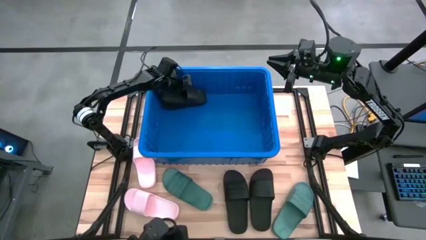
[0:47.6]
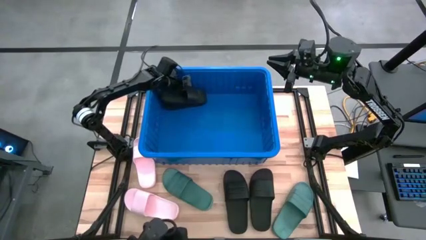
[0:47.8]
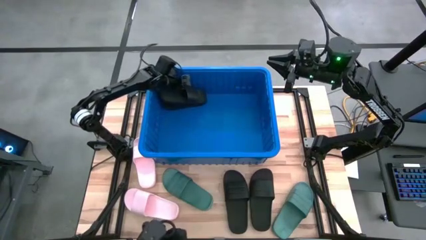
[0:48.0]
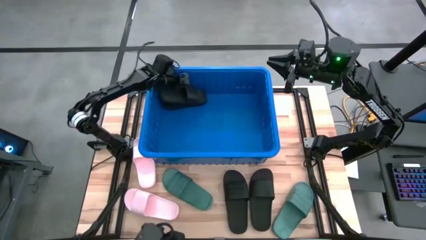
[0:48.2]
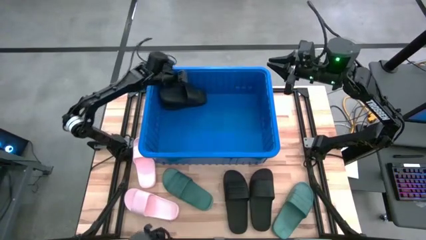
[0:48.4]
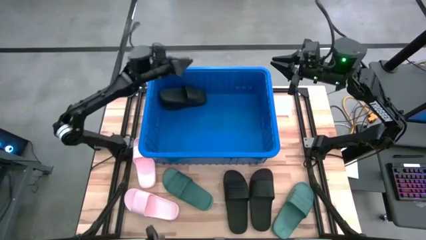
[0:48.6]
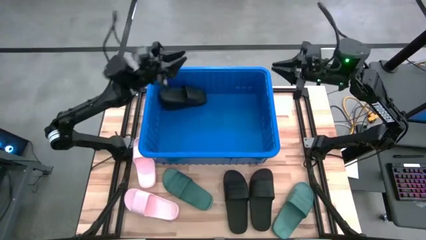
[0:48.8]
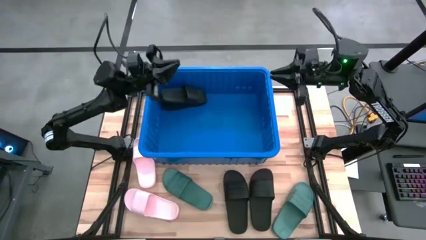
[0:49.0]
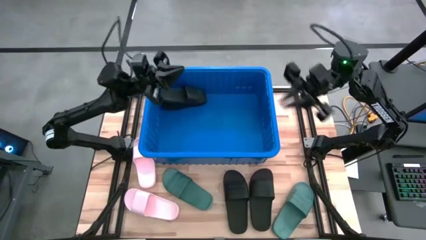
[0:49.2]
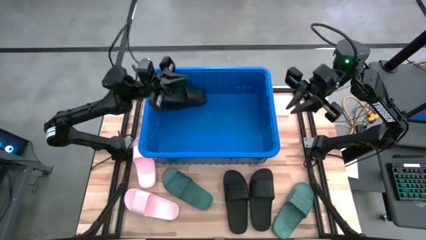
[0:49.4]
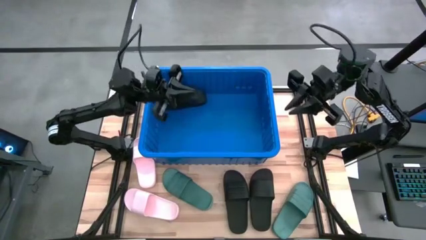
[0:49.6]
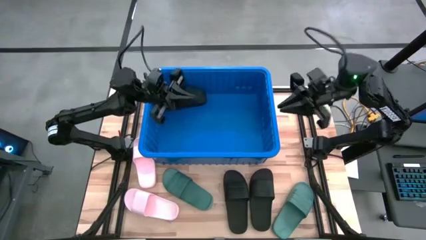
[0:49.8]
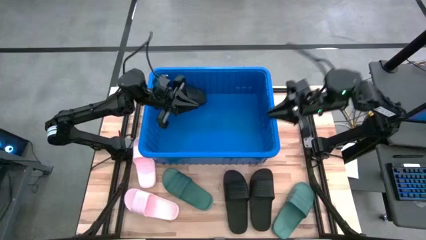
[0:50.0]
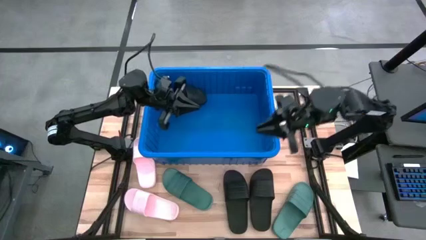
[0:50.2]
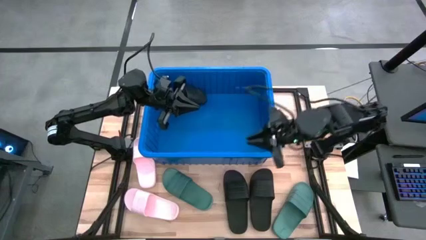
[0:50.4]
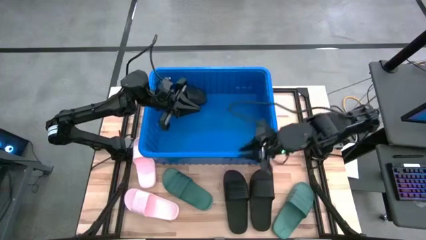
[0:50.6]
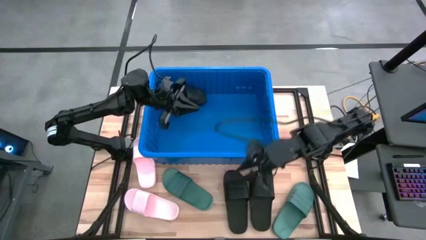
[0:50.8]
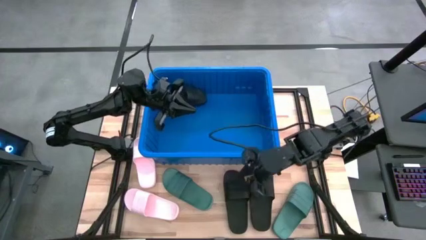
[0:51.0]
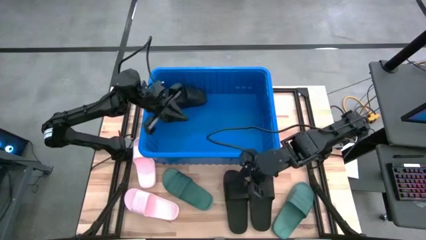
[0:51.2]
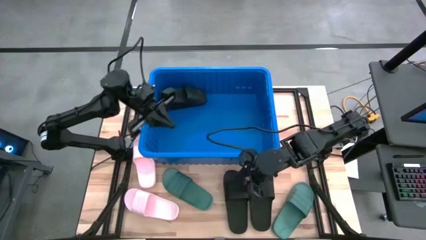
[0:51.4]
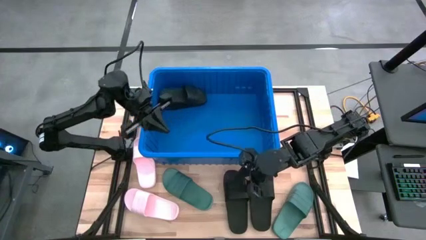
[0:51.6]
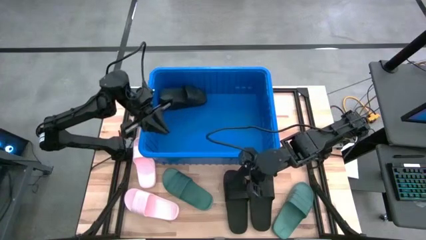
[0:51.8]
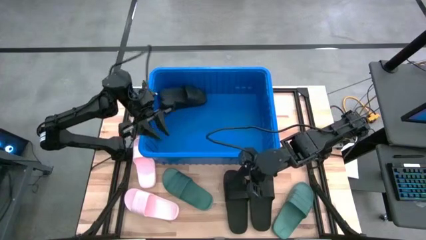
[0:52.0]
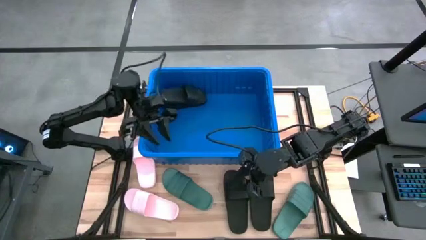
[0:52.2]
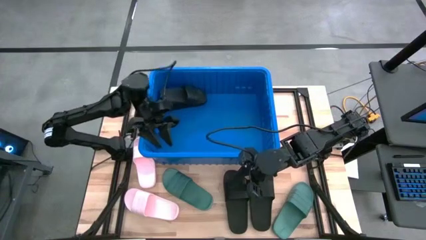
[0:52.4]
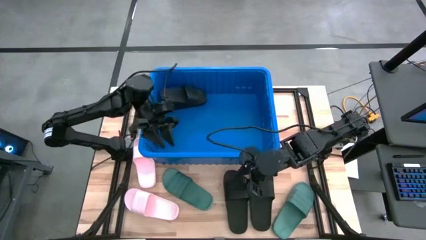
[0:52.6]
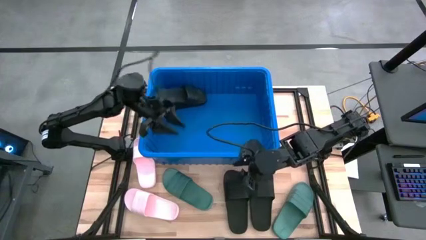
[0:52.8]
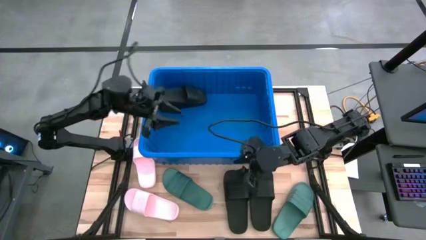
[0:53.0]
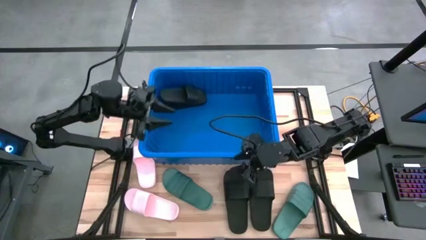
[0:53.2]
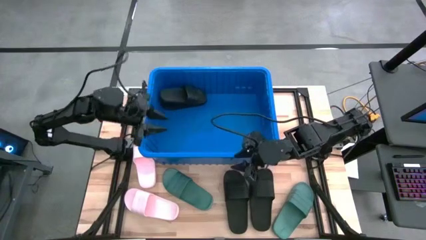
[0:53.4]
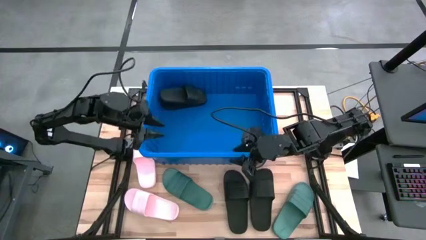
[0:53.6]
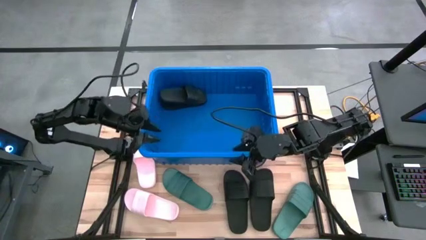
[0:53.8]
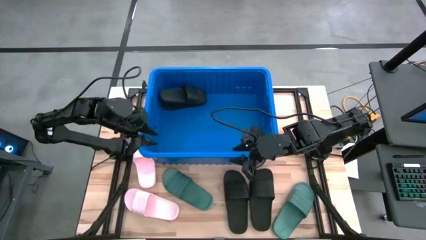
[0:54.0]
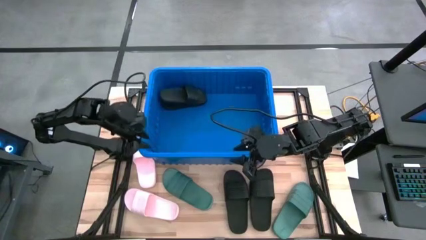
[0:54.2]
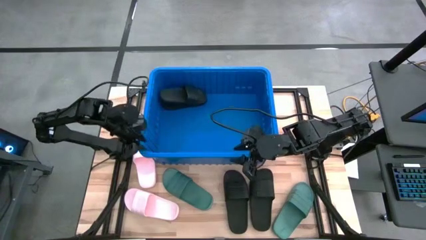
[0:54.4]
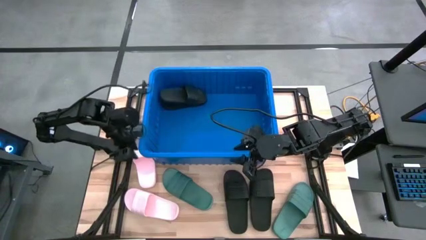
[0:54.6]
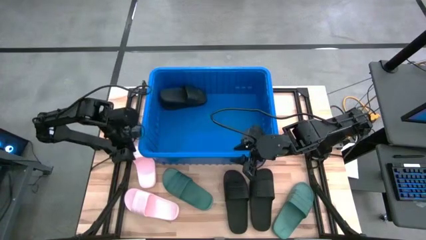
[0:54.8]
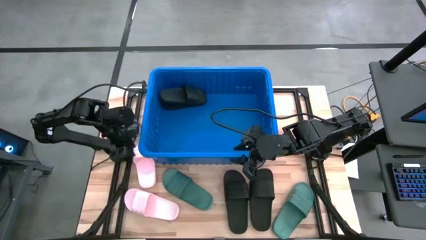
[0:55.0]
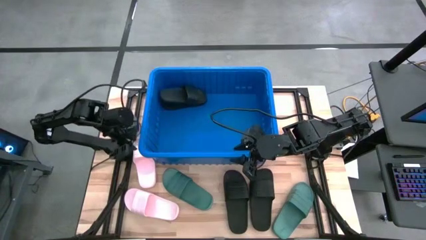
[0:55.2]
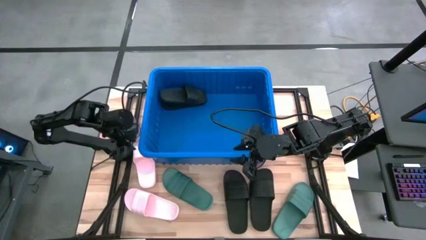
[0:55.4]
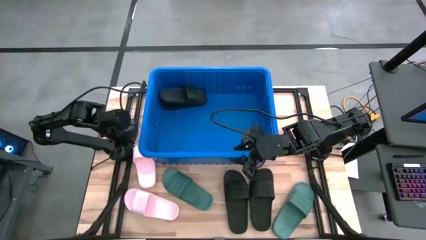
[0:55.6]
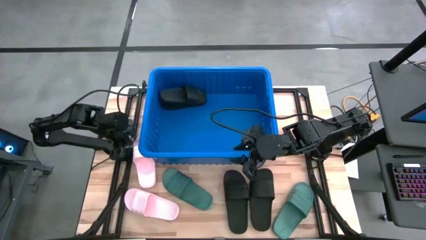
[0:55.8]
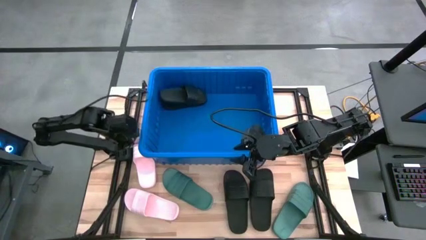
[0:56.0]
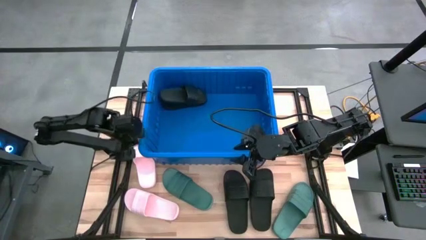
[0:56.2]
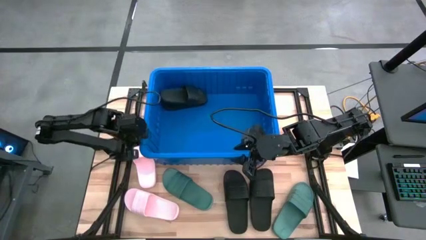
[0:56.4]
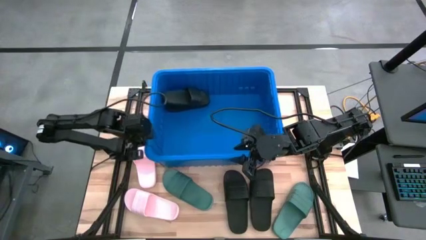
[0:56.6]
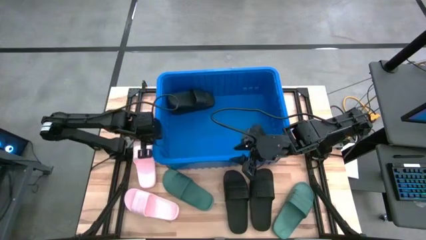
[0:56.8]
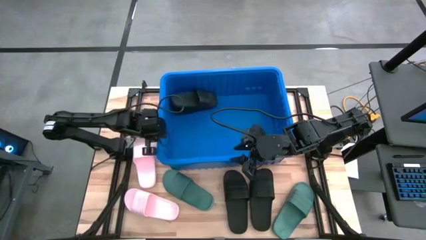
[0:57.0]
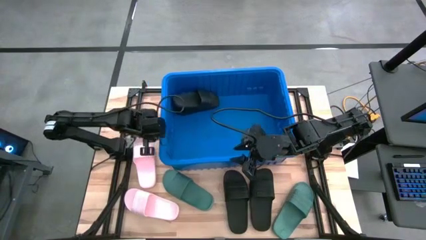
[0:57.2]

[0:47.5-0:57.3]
Task: Pick and place slides into bin
Adjust the blue container

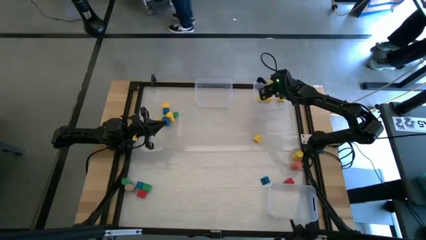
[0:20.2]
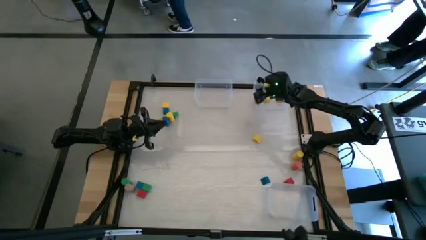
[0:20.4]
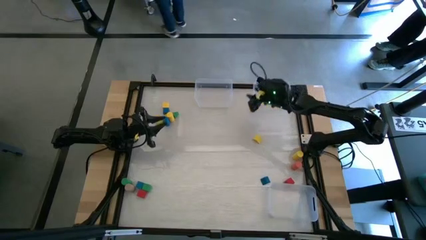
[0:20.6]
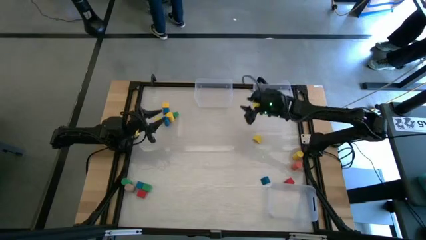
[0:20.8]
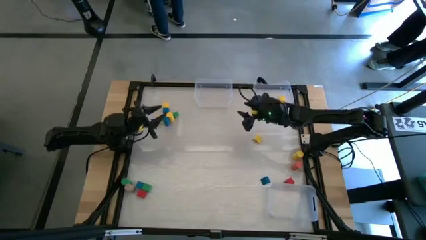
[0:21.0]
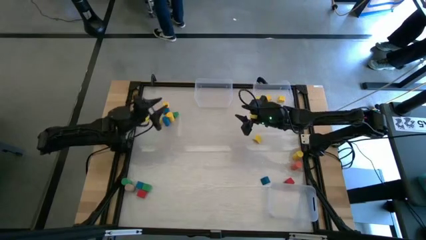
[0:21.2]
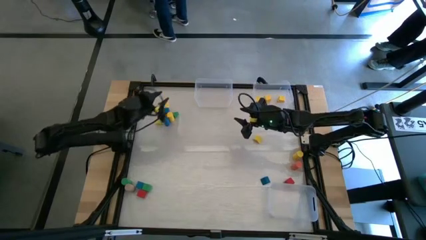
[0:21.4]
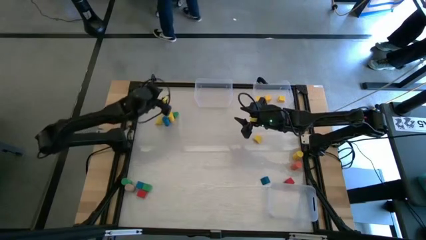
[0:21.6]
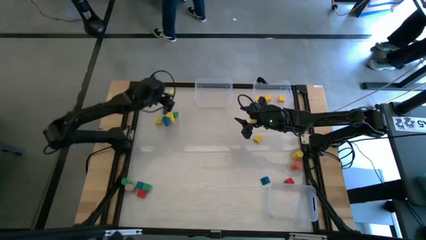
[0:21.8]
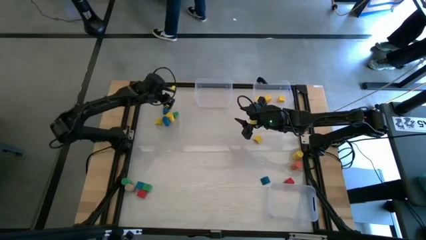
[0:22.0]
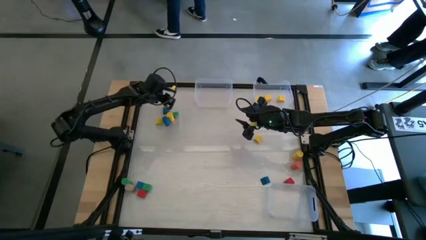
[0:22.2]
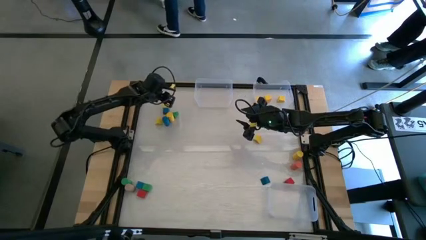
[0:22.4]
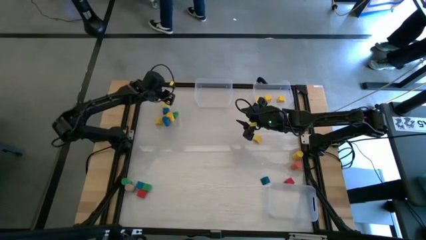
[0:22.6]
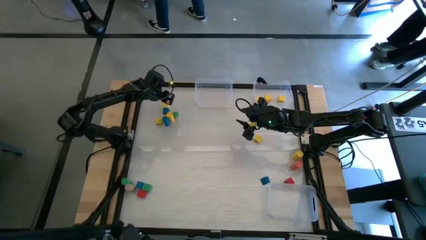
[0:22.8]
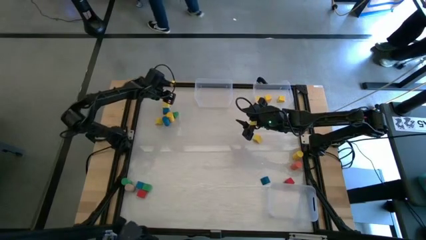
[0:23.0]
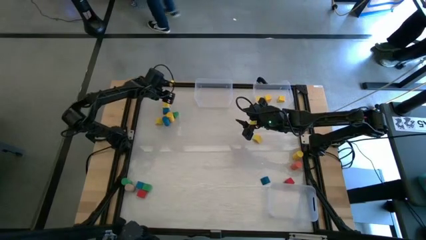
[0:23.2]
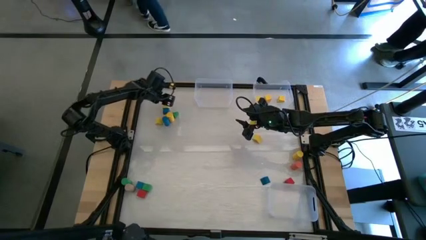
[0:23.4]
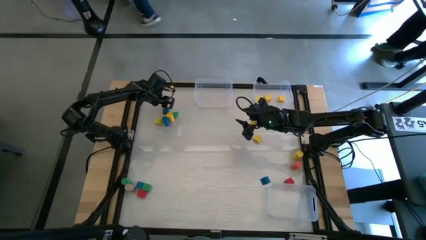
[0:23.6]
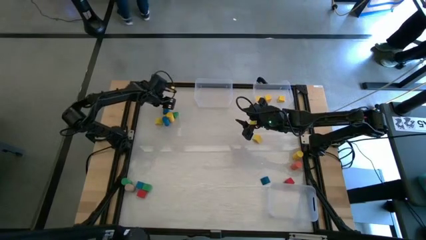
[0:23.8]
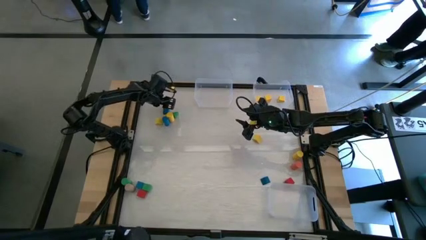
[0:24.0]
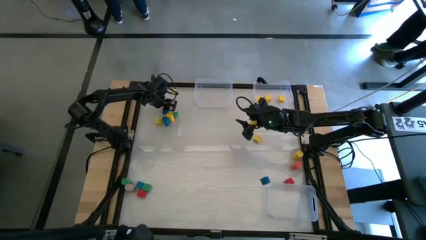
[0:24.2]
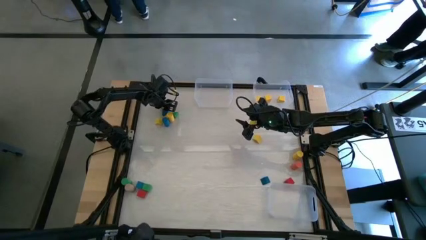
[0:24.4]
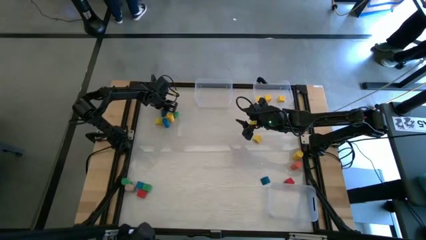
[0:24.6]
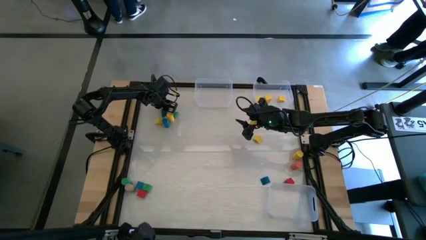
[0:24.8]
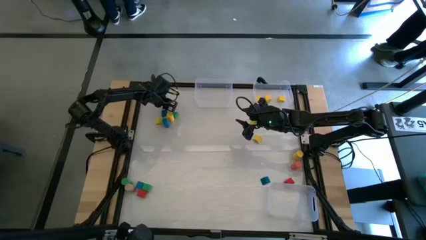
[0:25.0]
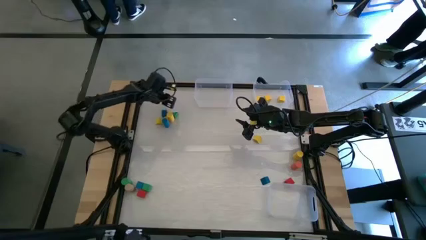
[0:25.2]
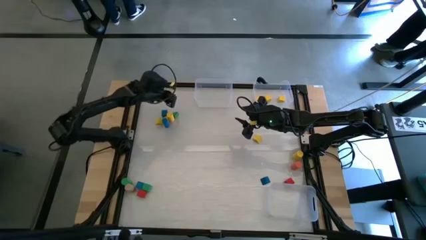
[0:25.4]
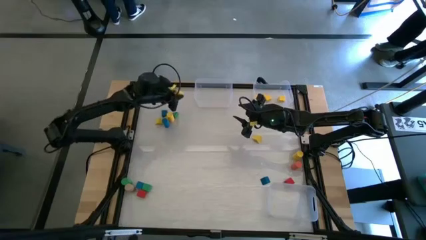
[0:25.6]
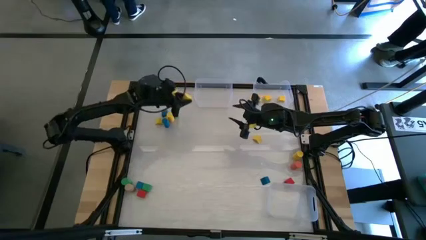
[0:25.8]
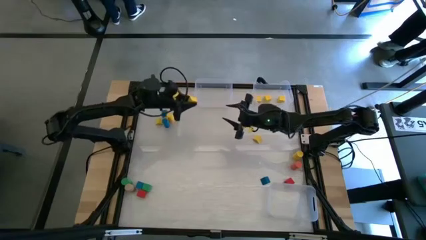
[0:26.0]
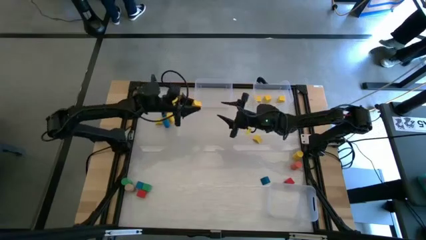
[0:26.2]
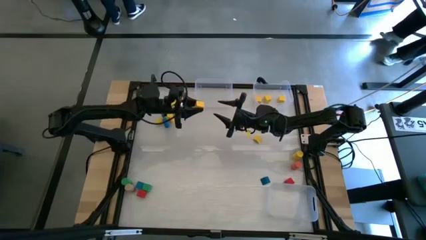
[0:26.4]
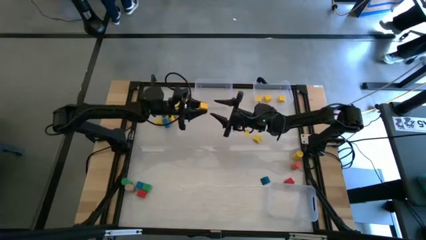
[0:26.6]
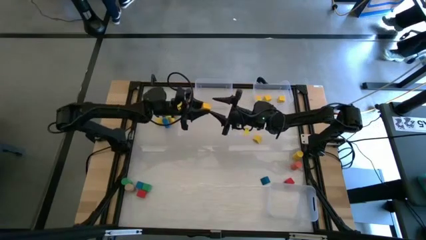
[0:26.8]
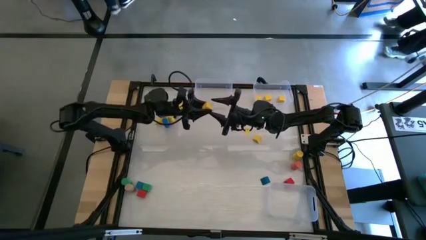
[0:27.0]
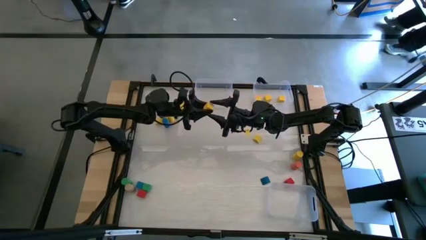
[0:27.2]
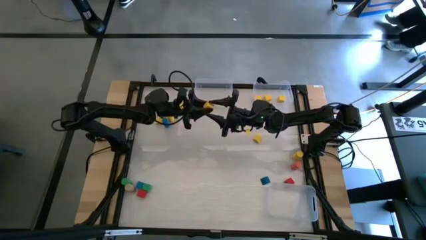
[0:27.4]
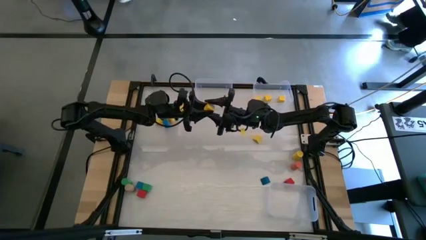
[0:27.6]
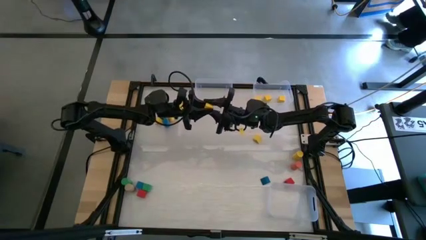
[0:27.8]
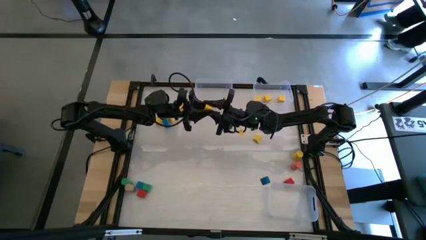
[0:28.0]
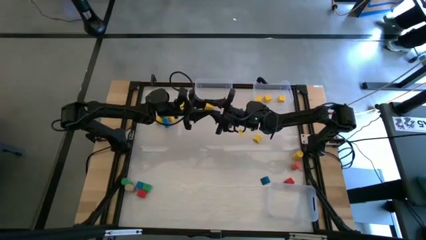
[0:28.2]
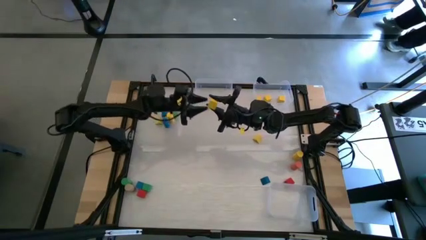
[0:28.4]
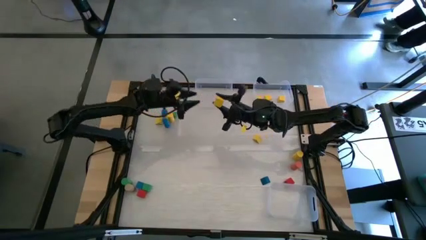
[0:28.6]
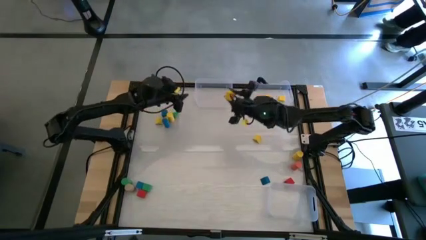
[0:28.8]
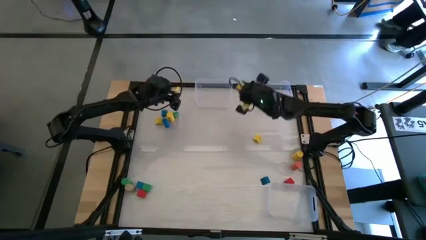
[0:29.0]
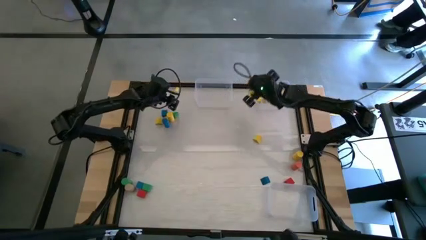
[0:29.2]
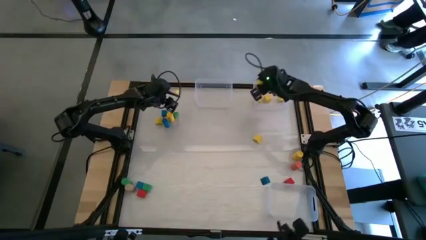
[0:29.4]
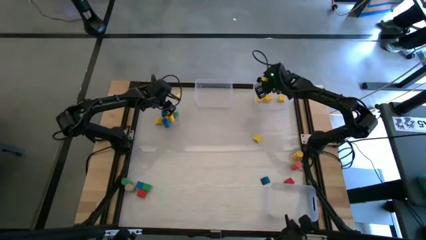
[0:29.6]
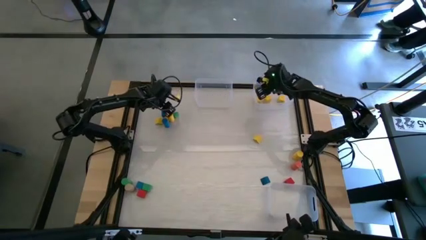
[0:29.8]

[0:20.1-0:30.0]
Task: Sort blocks by size
Put the yellow square block into the top right transparent bin
